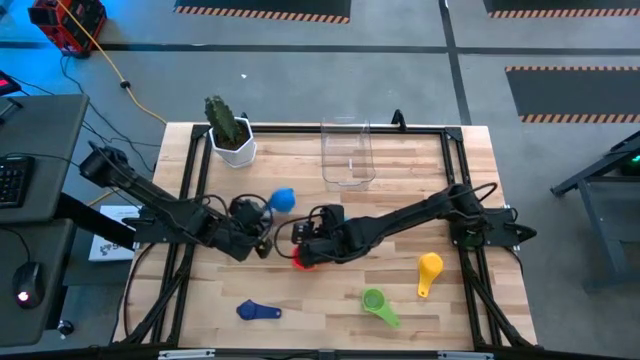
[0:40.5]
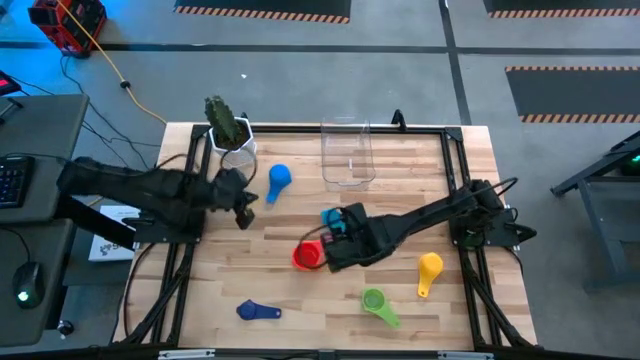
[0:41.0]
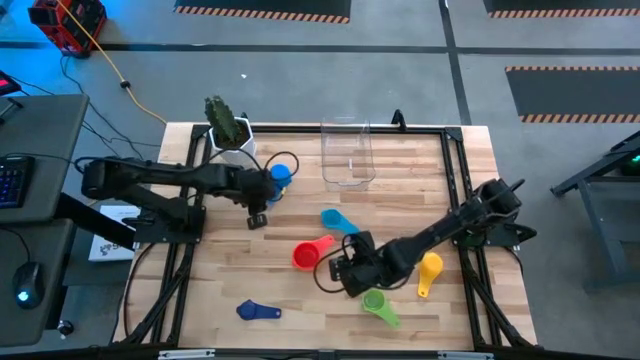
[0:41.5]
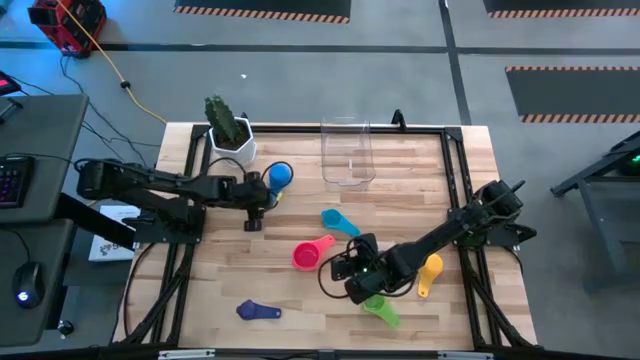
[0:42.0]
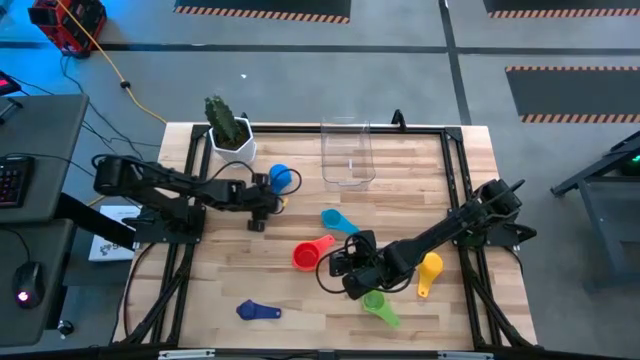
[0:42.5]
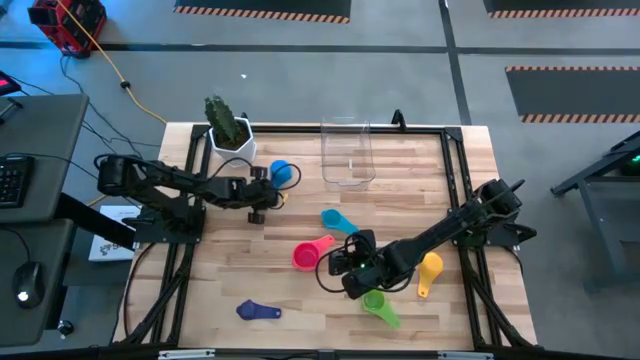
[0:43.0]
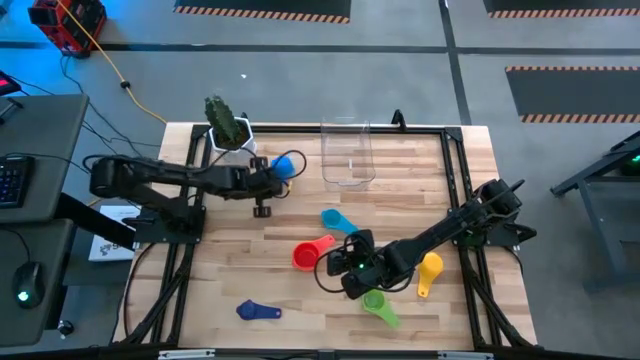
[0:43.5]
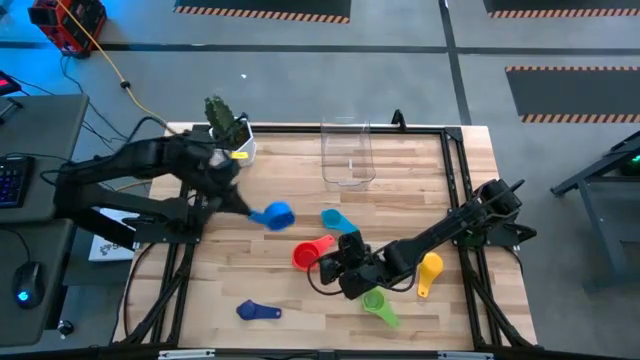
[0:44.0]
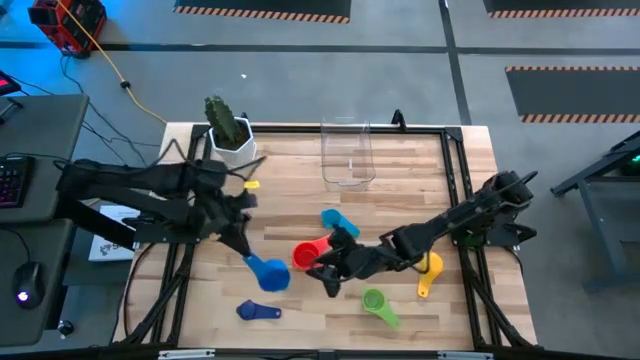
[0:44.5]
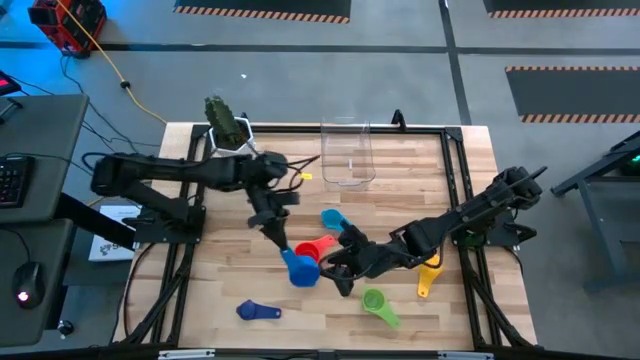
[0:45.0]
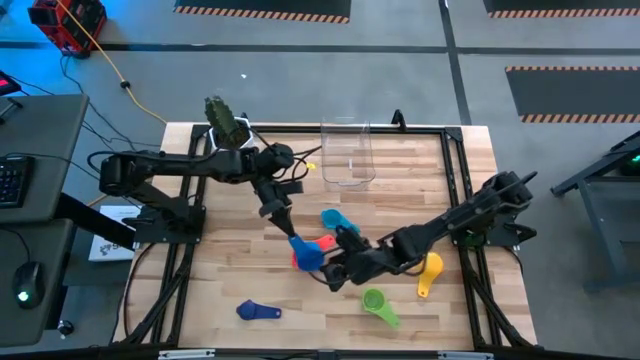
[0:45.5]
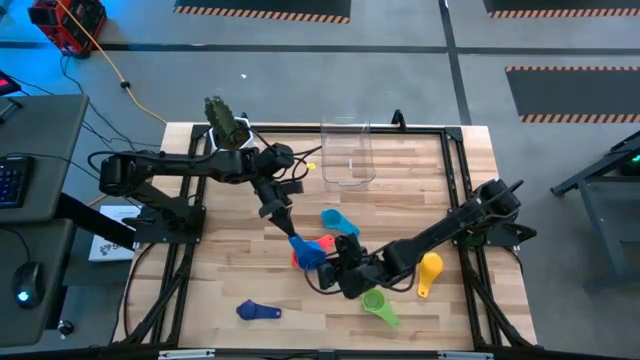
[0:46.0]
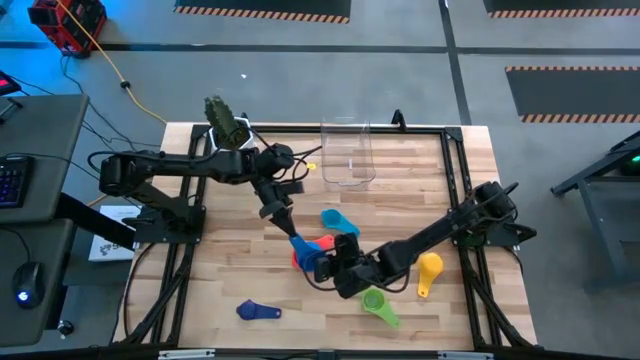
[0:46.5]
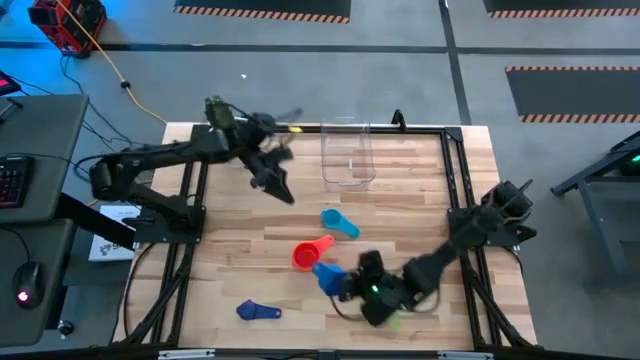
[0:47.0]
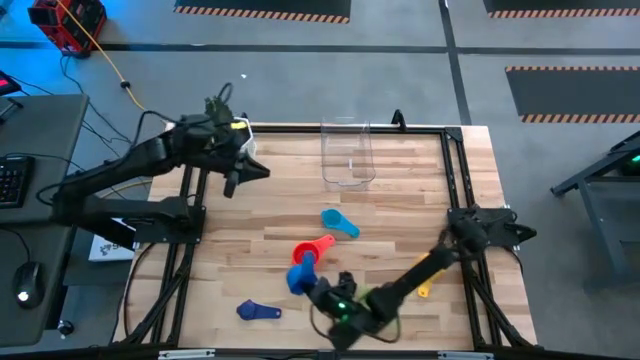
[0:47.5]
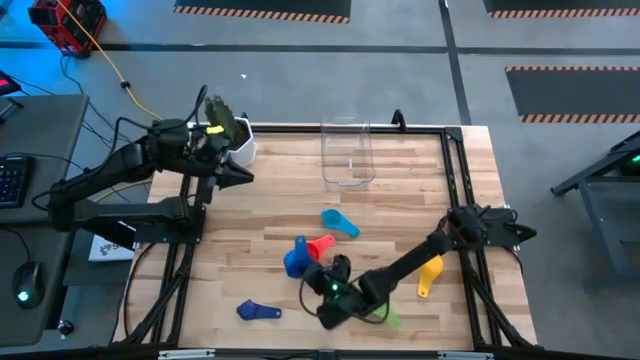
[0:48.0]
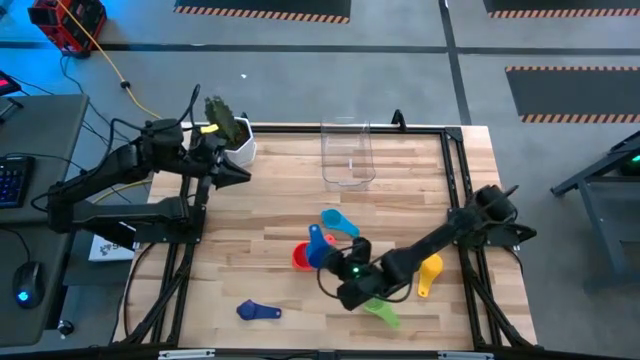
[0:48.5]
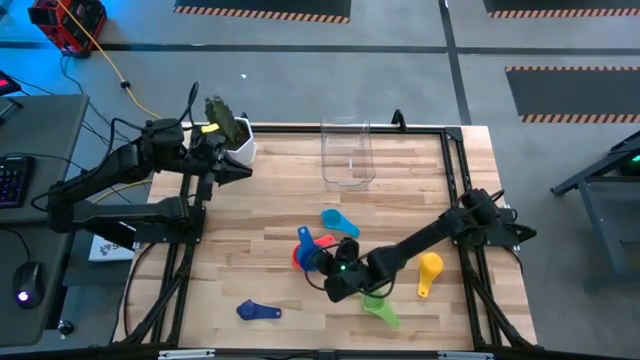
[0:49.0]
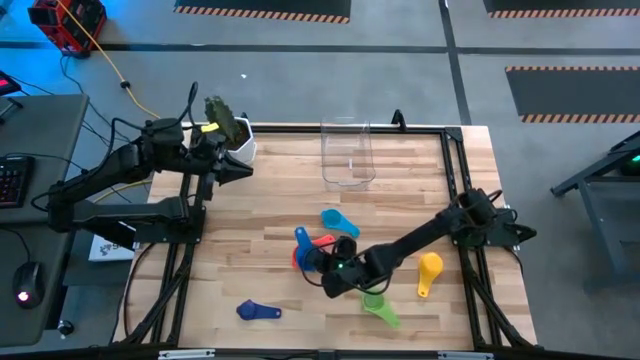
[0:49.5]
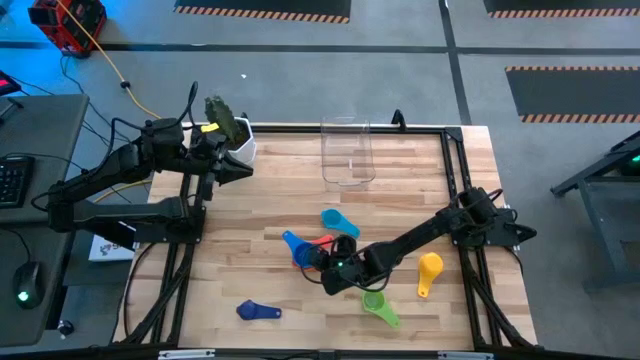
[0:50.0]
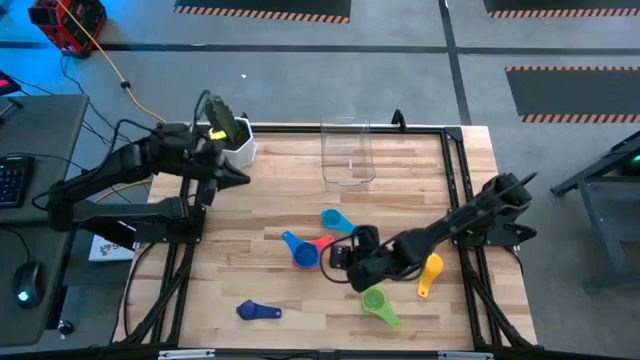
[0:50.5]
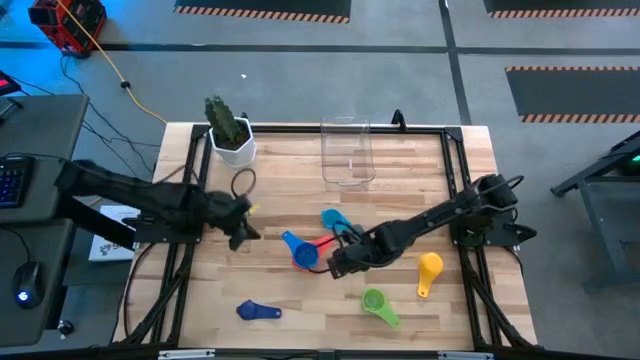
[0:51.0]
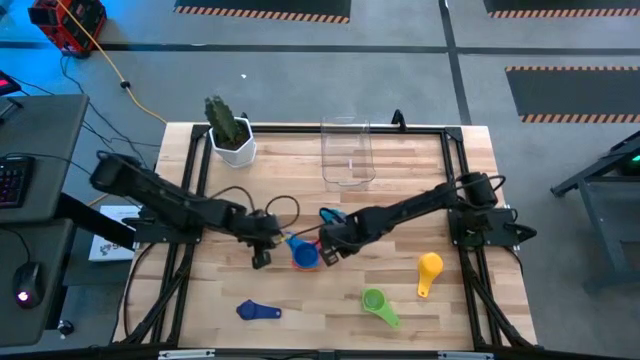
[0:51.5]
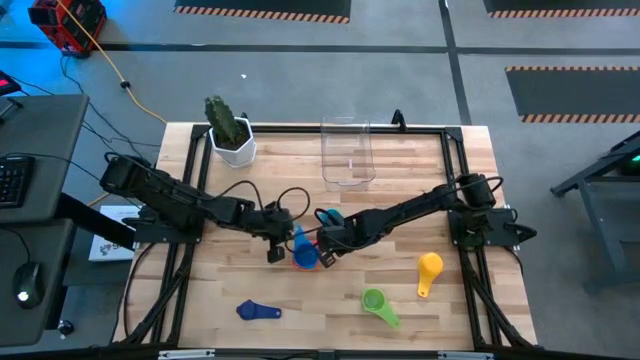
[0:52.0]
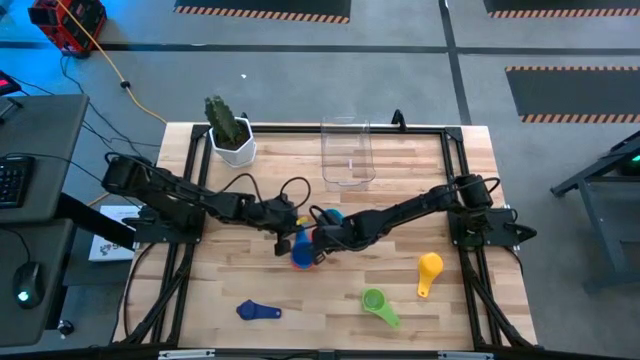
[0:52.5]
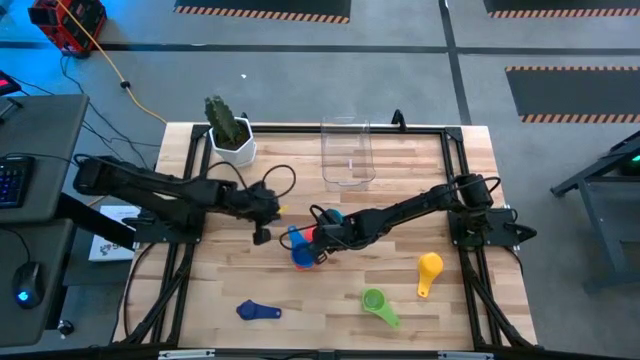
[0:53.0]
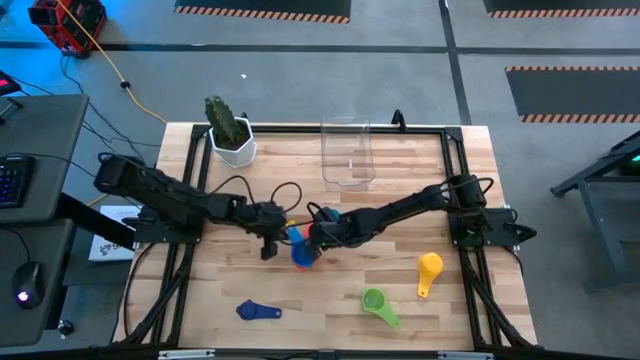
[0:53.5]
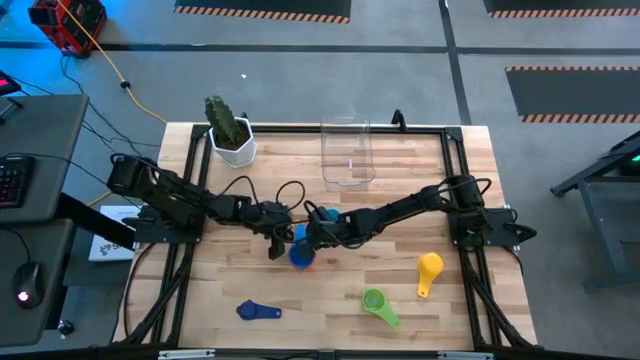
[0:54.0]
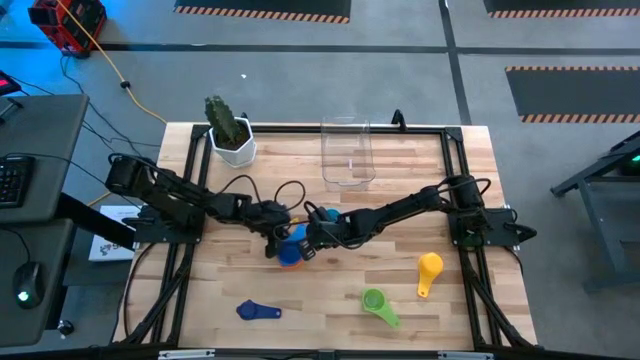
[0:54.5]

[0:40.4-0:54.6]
Task: Nest measuring cups in basket
Stack the blue measuring cup on top of the red measuring cup
